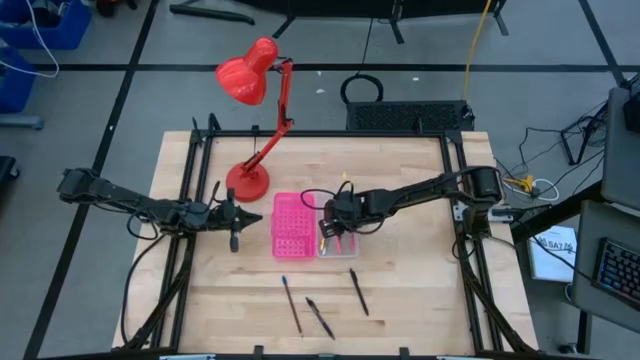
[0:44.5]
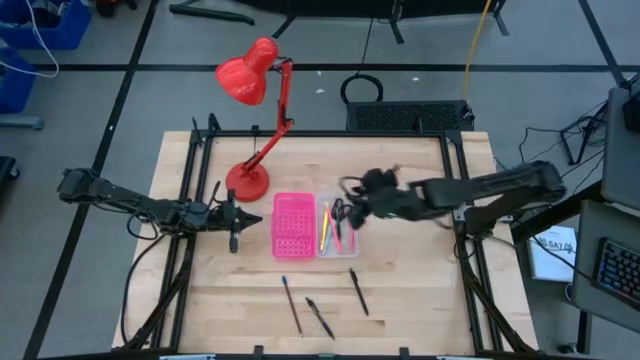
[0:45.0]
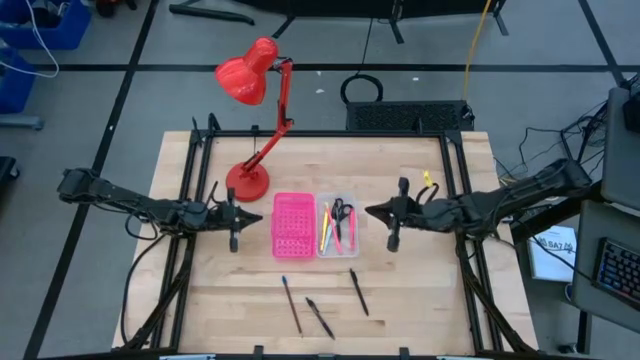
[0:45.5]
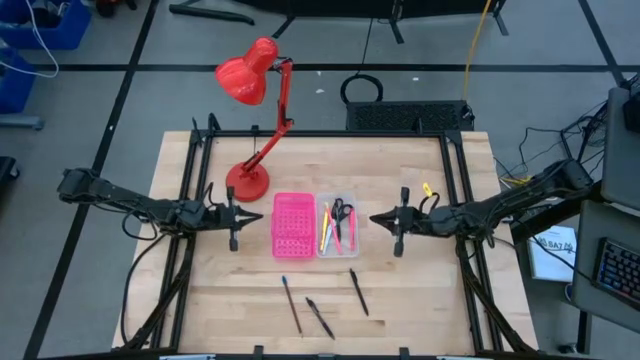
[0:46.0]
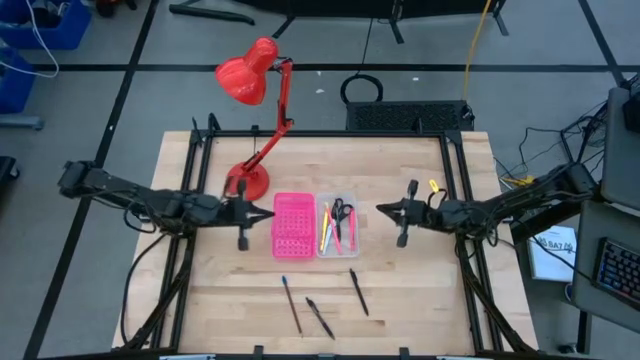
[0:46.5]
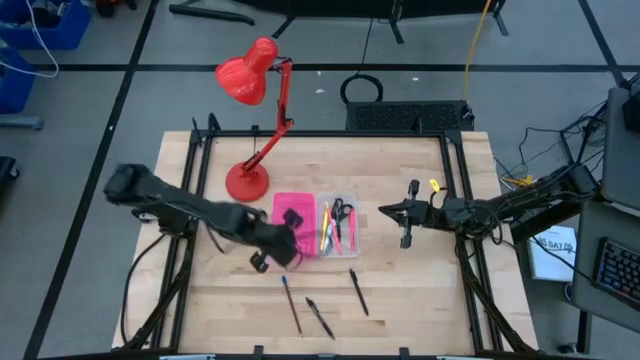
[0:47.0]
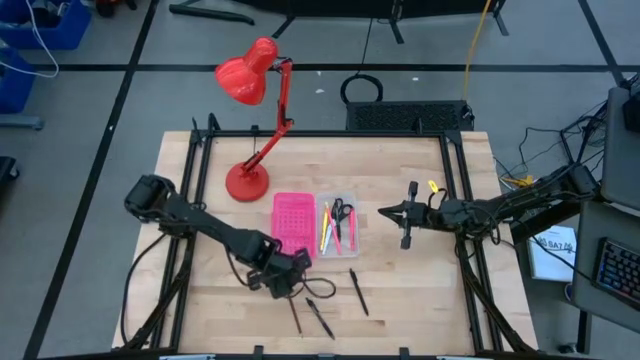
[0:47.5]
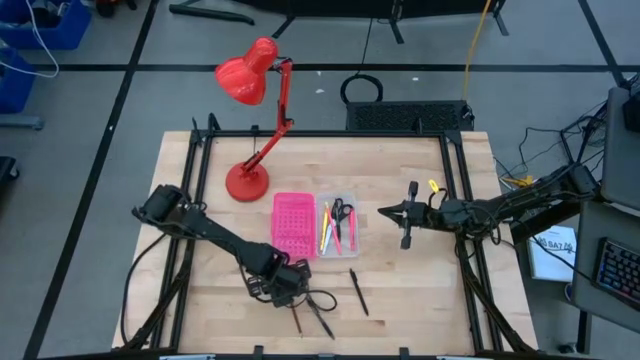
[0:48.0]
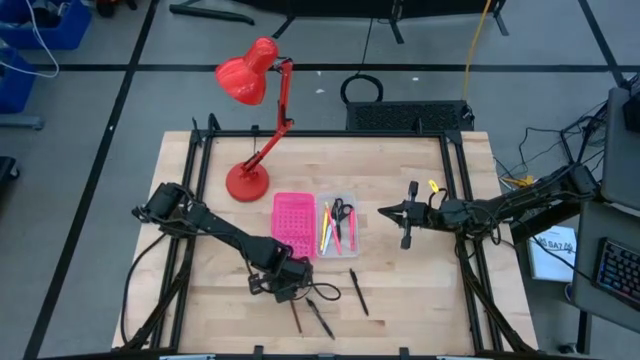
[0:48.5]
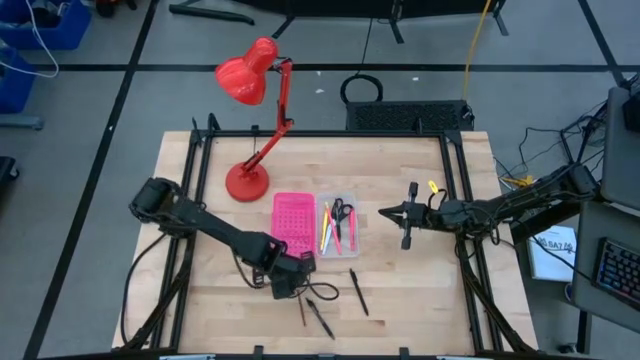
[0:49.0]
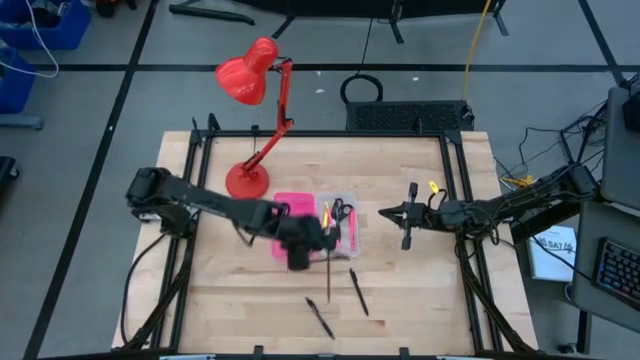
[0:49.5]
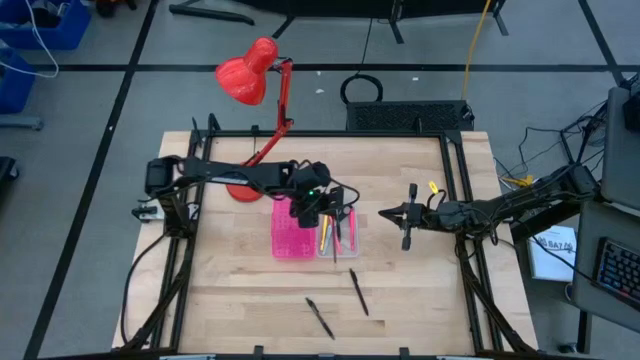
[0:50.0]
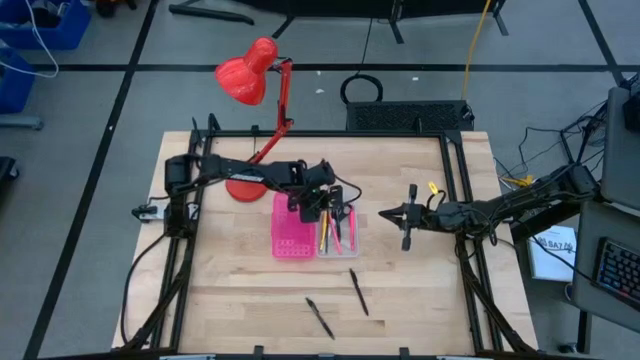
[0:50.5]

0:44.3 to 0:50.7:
Task: Pick & place school supplies into a supply box
Put the brown pencil into the supply box

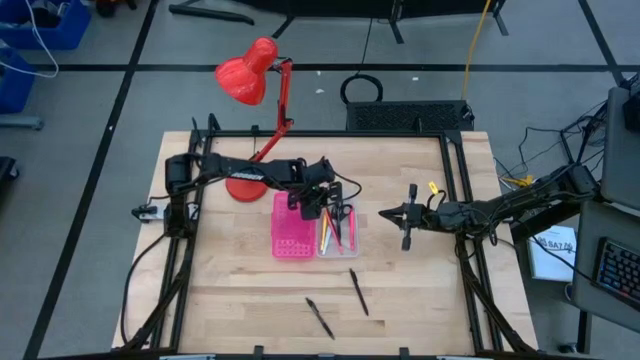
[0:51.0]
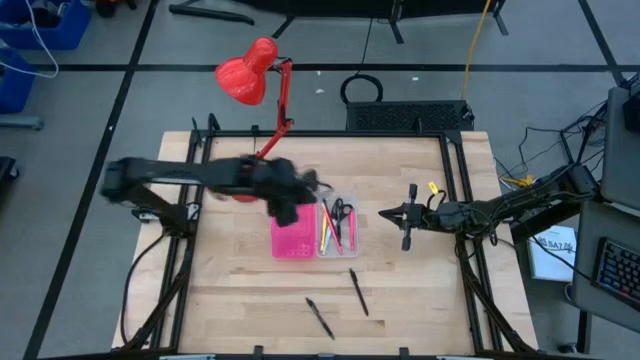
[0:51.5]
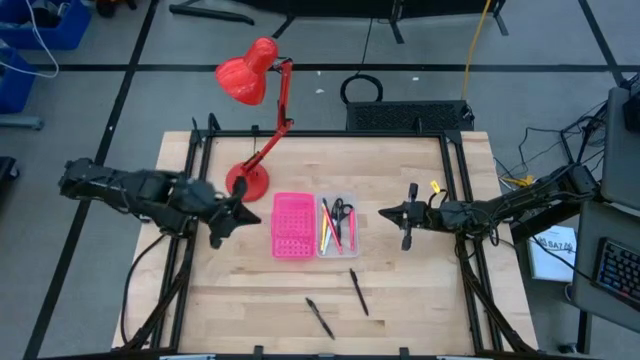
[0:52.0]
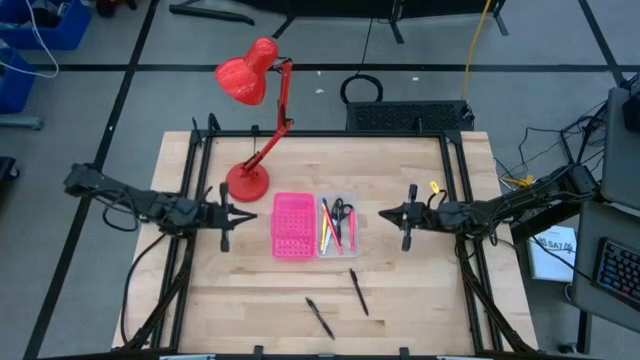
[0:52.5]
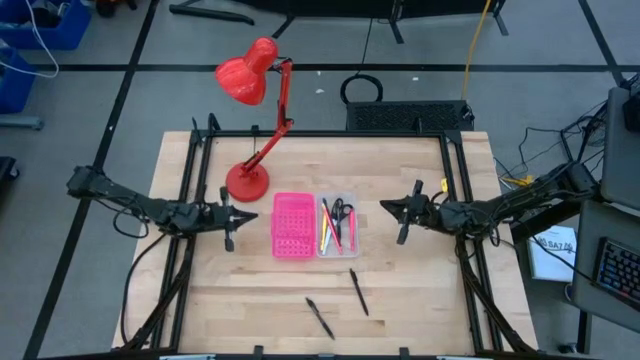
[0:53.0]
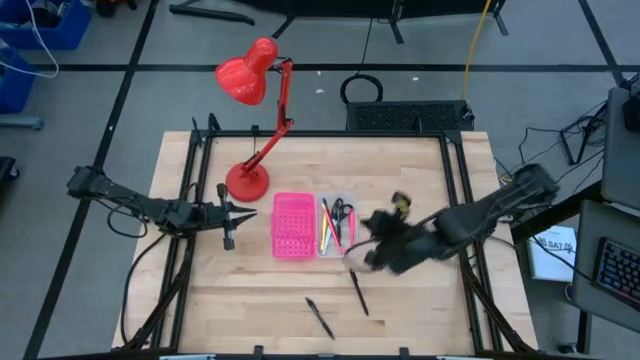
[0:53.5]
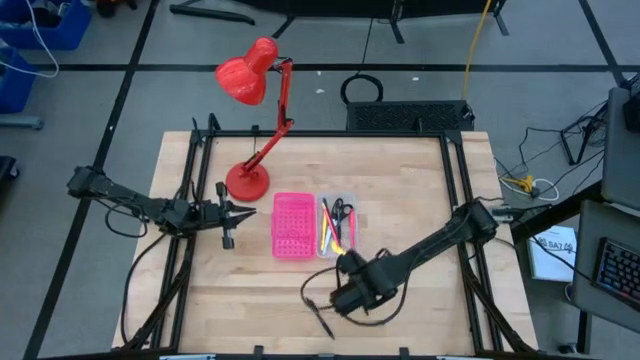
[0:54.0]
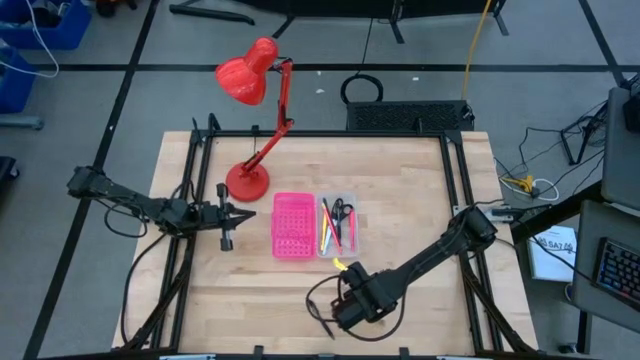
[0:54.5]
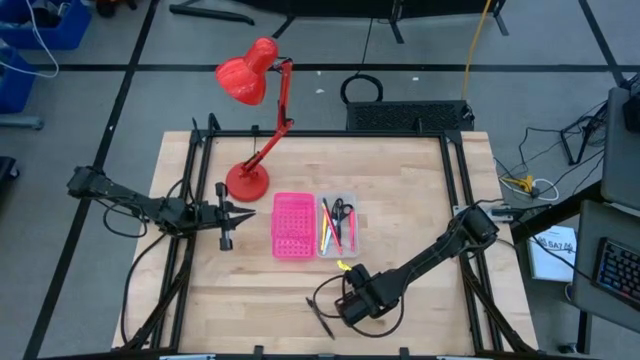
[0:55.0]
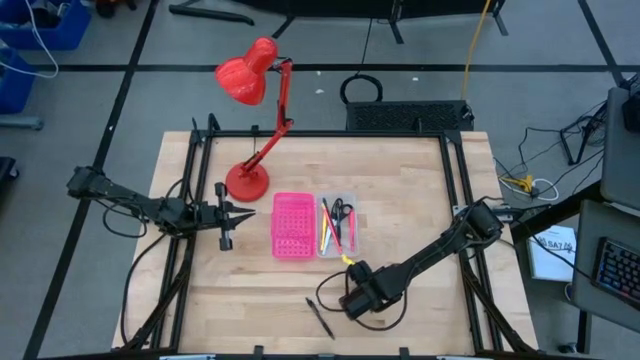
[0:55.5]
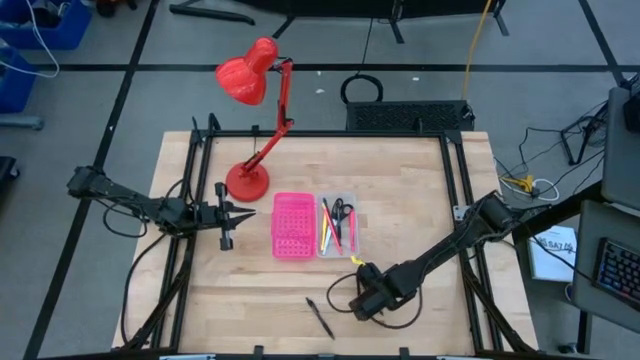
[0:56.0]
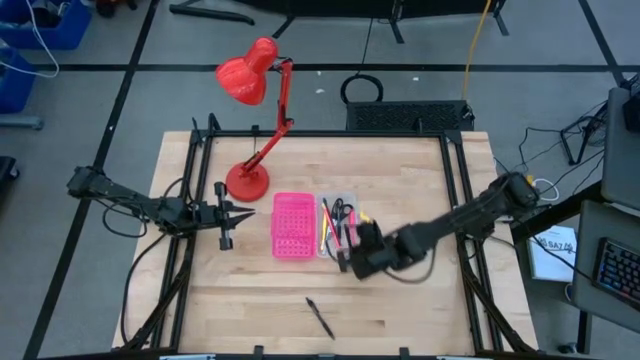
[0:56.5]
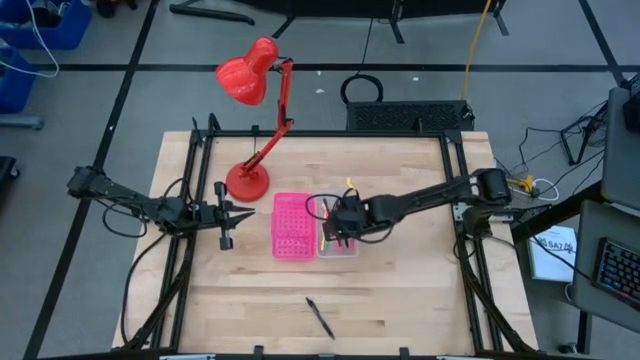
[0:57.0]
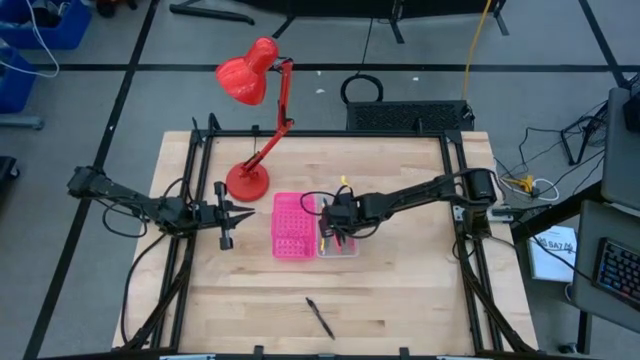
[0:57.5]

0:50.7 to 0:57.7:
Put the right black pen into the supply box

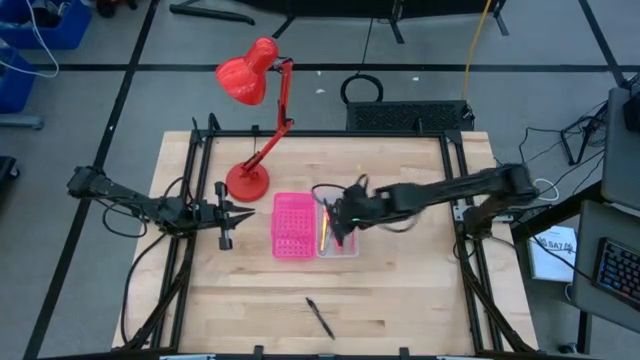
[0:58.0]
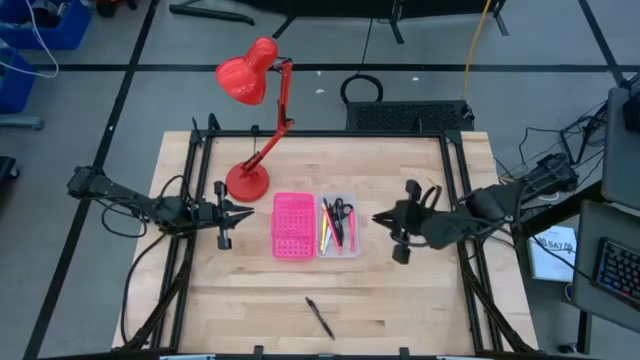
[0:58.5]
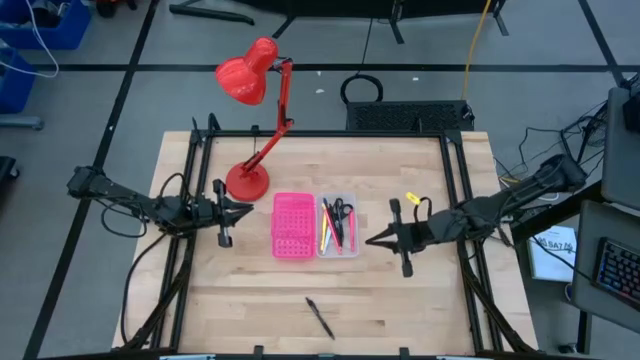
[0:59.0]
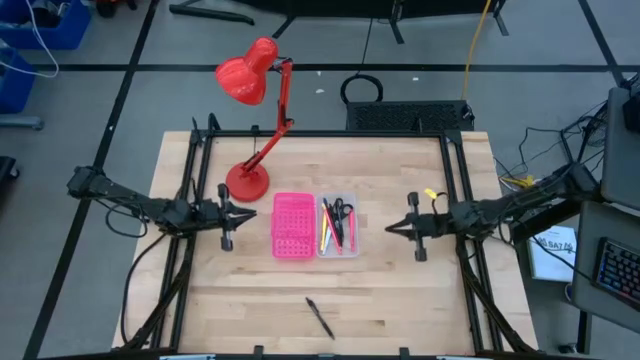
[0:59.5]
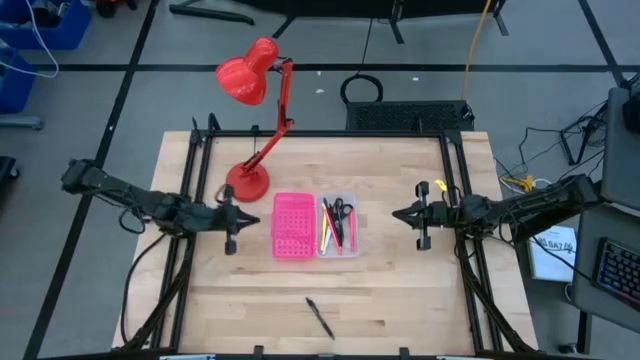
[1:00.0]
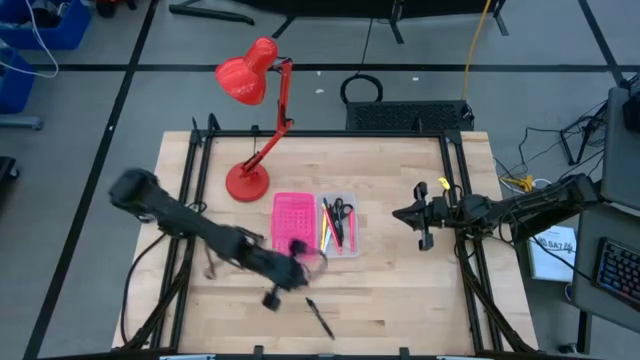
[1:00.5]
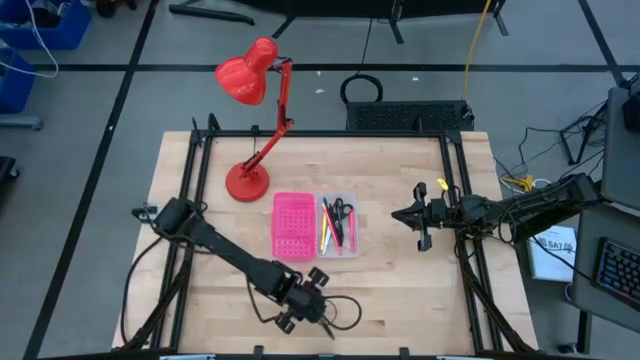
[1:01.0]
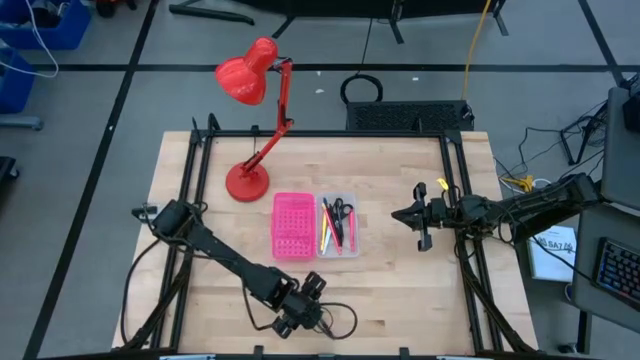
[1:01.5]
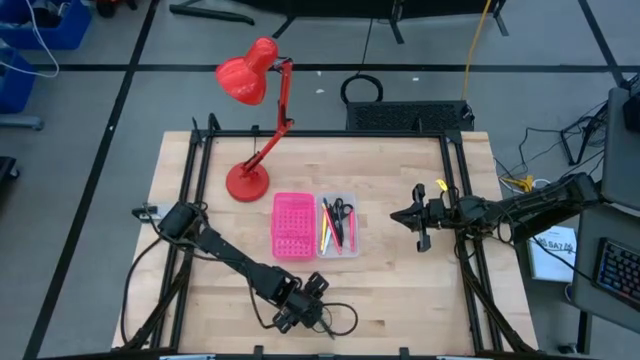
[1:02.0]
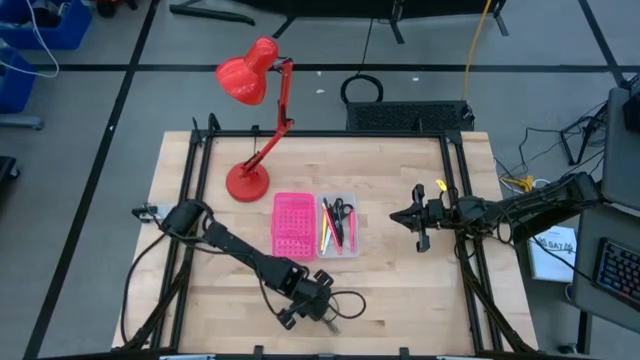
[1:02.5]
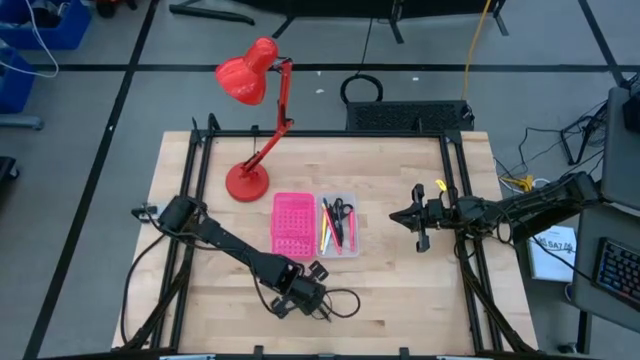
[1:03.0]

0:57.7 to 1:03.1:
Put the black pen into the supply box

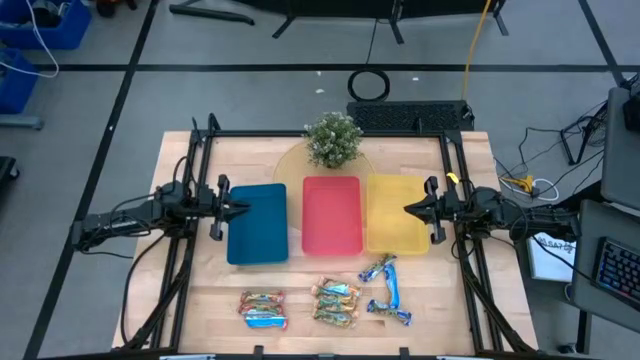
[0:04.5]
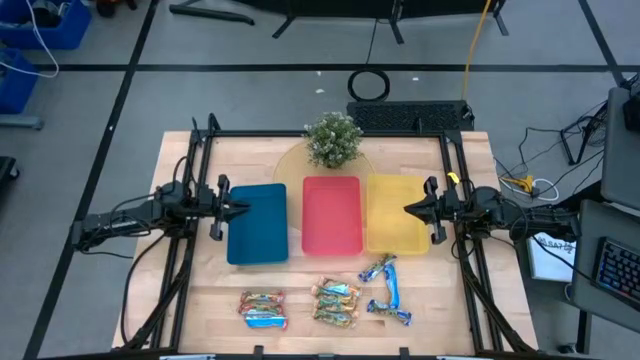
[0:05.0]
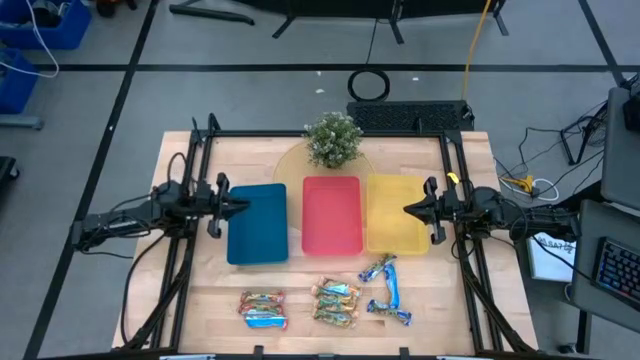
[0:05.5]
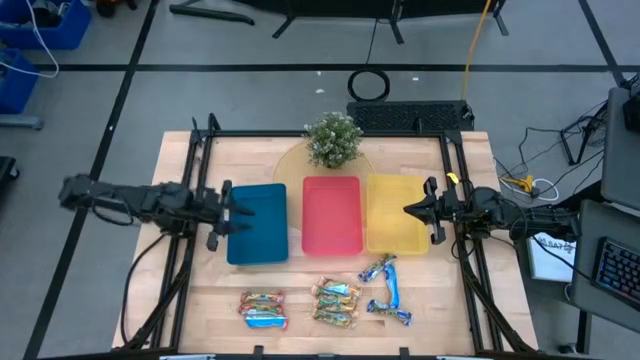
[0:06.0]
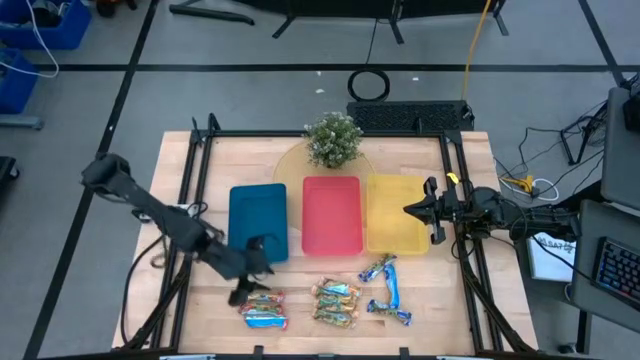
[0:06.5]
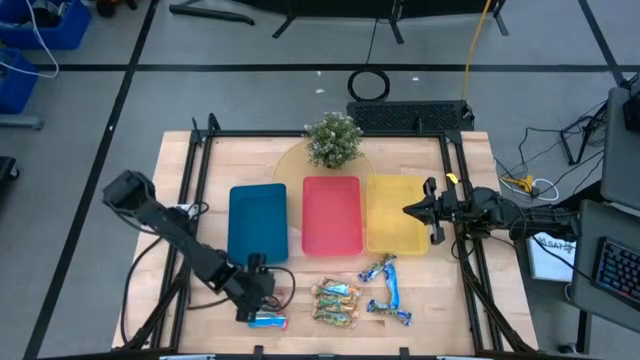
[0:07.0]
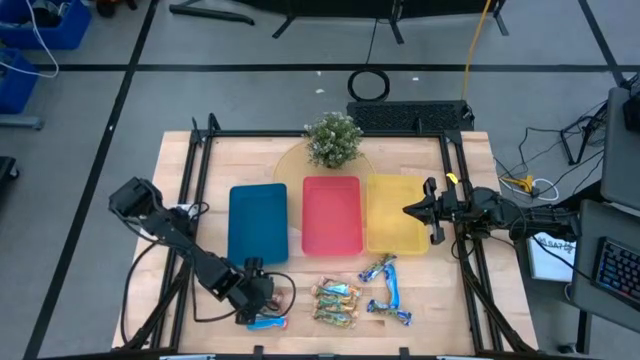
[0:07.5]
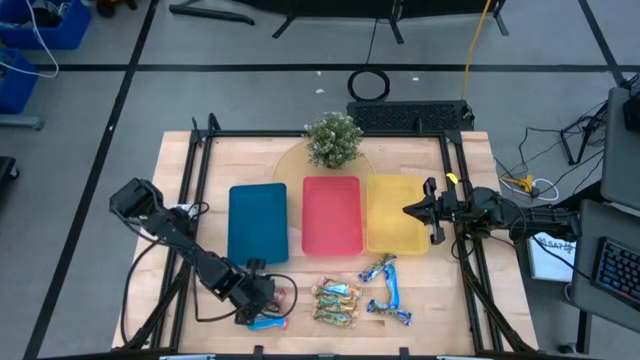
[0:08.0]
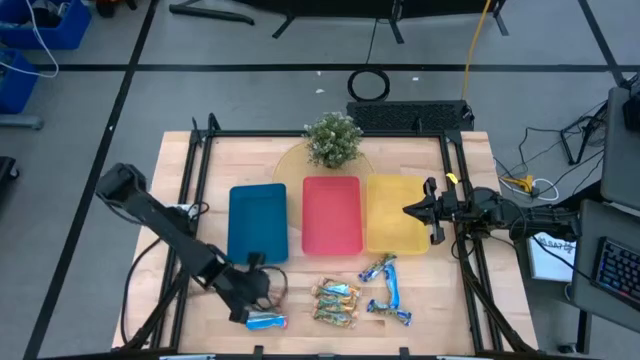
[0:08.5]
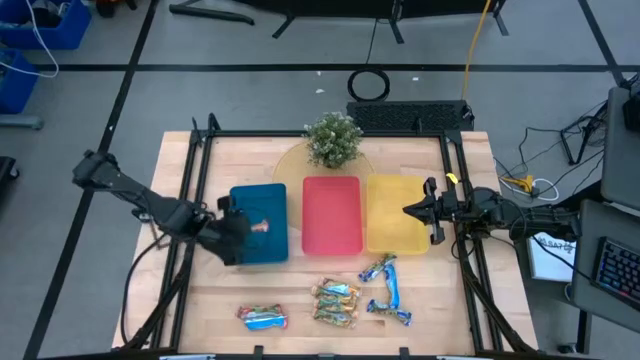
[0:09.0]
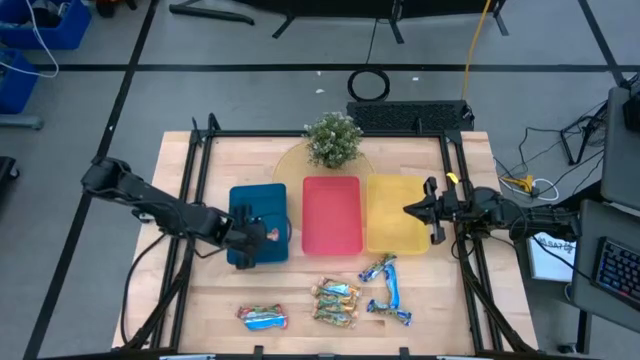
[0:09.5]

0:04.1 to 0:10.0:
Task: Pick and place Granola Bars by type
Put the red granola bar into the blue bin
